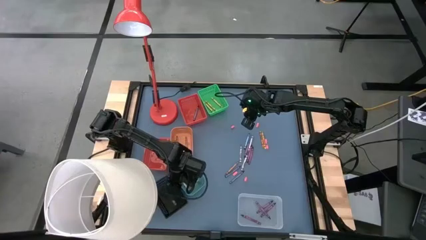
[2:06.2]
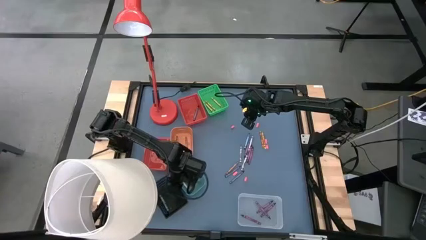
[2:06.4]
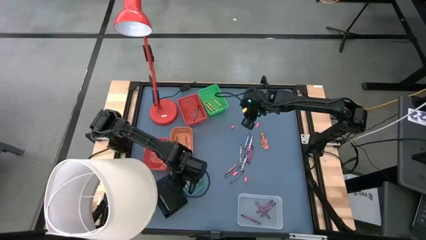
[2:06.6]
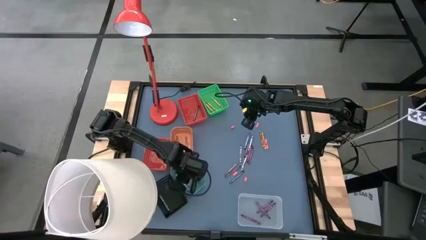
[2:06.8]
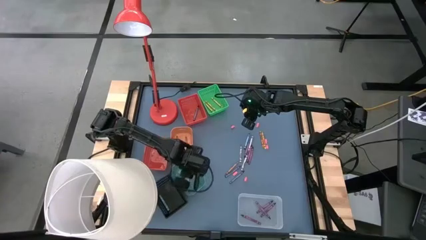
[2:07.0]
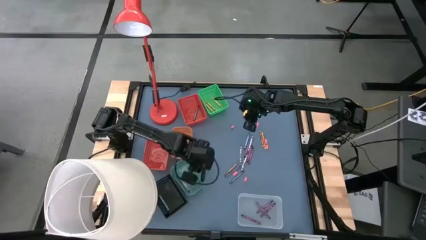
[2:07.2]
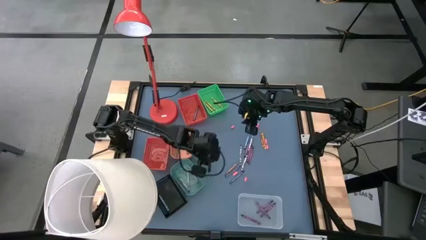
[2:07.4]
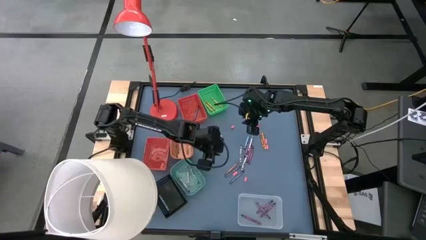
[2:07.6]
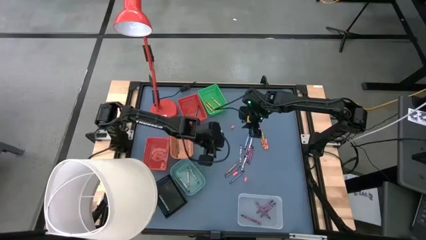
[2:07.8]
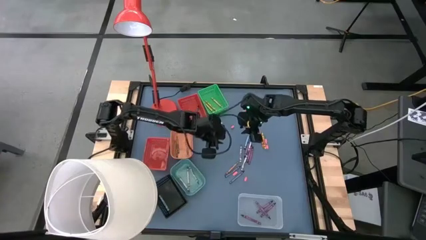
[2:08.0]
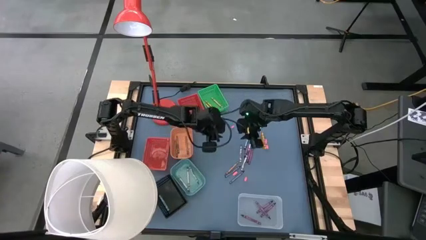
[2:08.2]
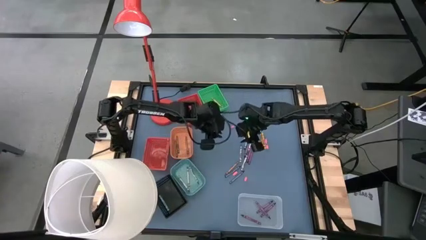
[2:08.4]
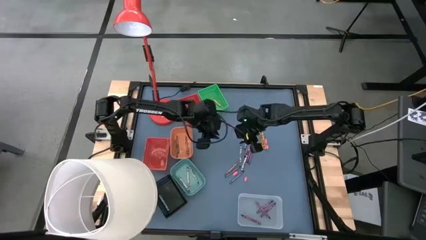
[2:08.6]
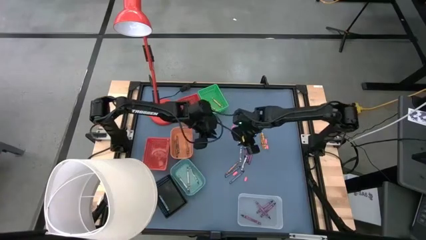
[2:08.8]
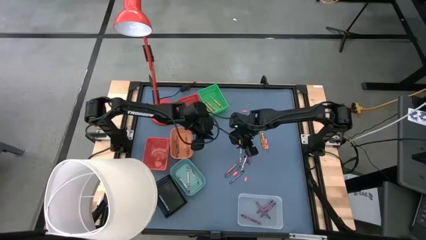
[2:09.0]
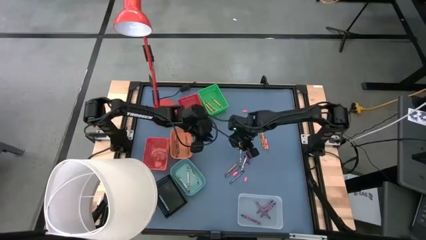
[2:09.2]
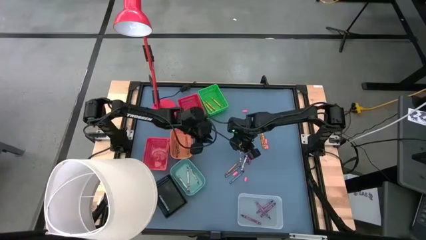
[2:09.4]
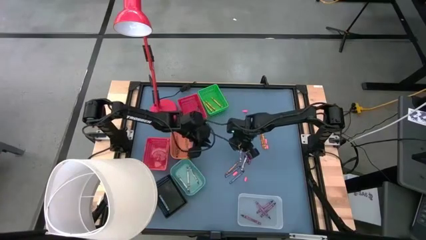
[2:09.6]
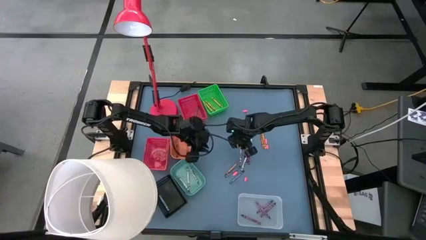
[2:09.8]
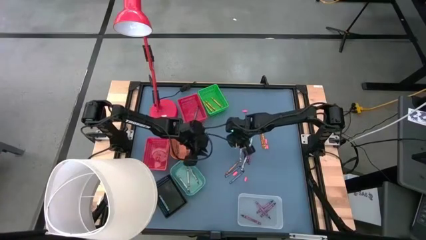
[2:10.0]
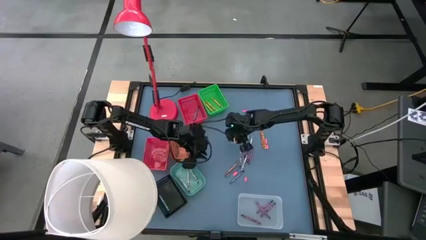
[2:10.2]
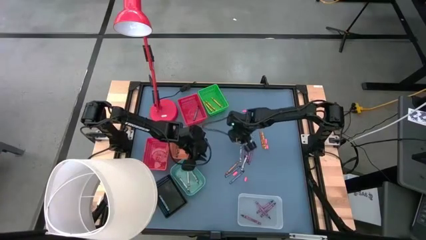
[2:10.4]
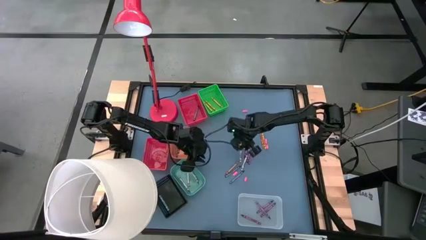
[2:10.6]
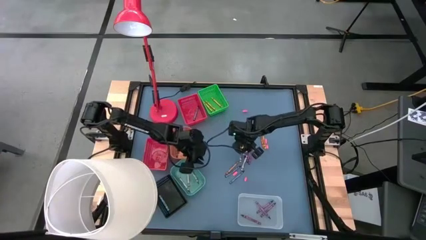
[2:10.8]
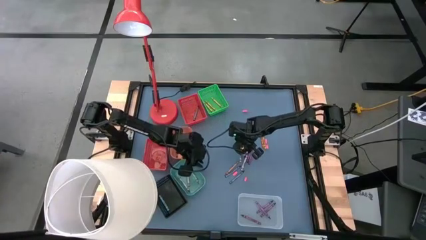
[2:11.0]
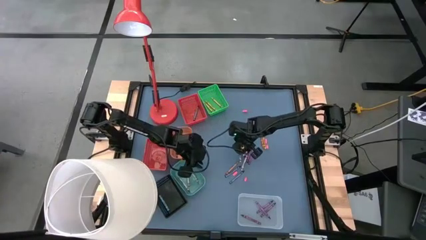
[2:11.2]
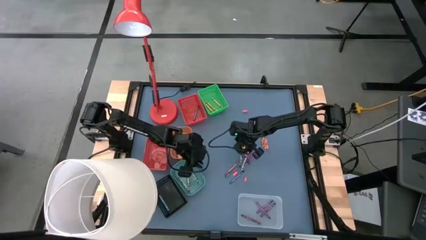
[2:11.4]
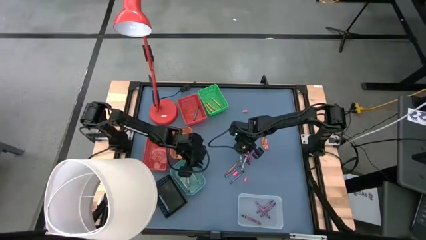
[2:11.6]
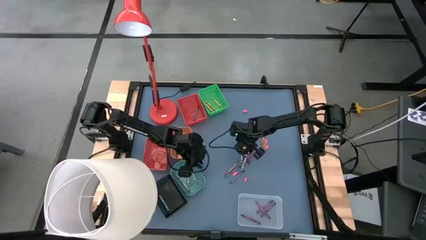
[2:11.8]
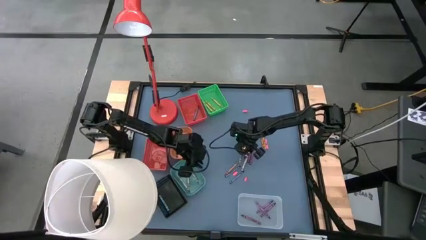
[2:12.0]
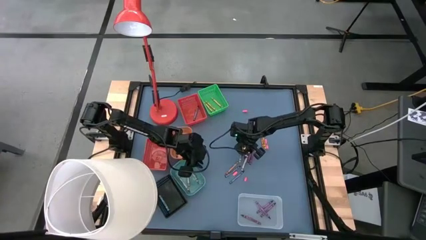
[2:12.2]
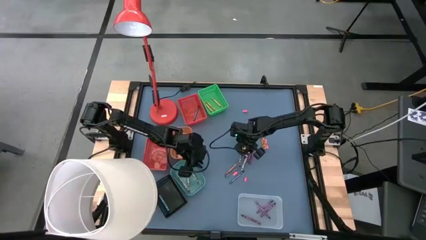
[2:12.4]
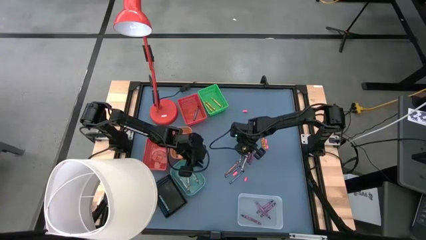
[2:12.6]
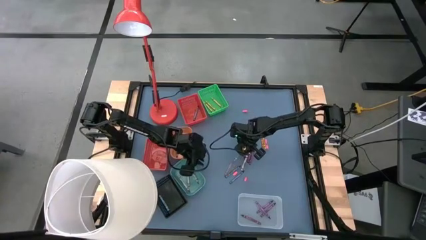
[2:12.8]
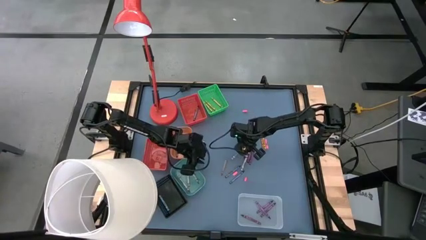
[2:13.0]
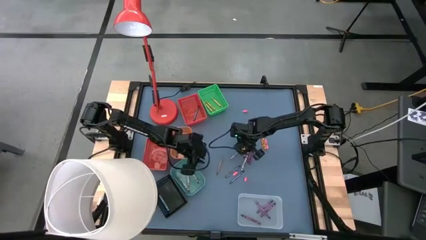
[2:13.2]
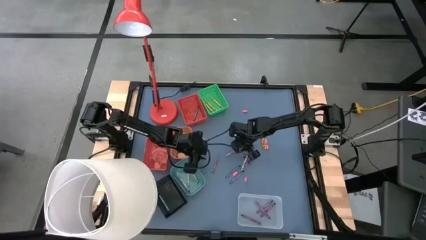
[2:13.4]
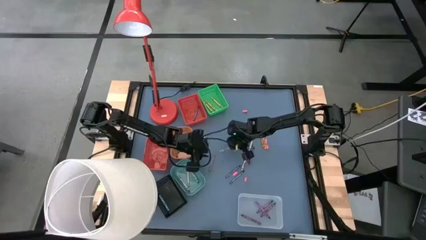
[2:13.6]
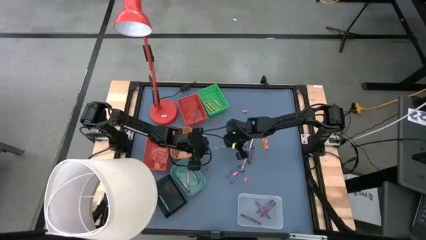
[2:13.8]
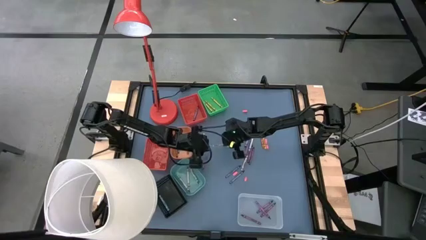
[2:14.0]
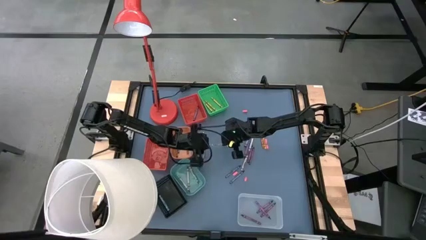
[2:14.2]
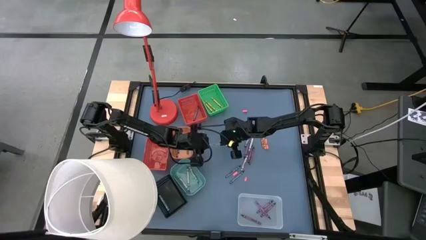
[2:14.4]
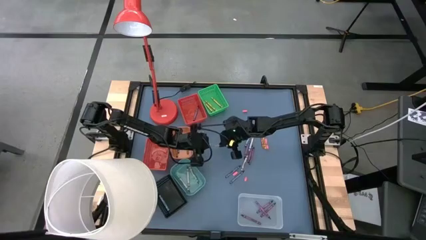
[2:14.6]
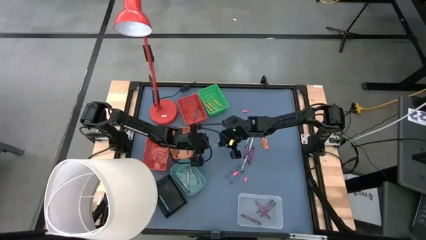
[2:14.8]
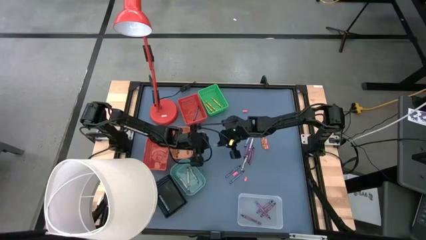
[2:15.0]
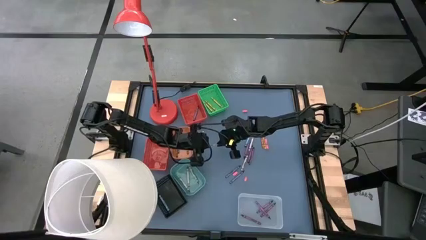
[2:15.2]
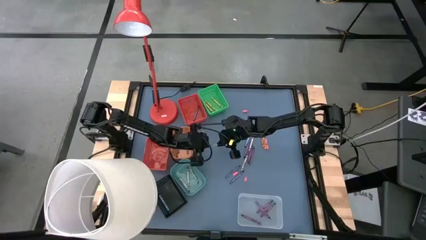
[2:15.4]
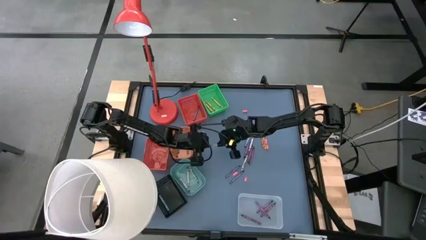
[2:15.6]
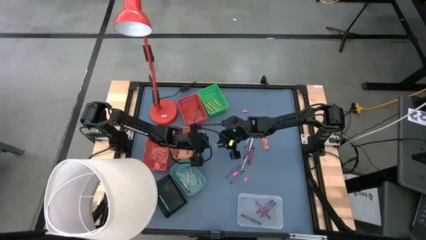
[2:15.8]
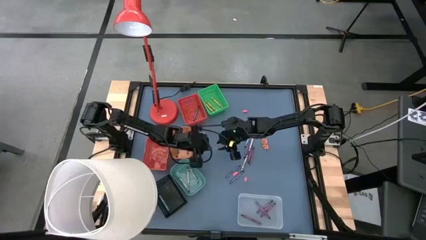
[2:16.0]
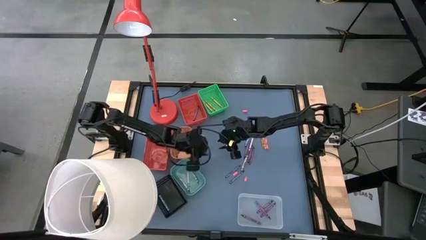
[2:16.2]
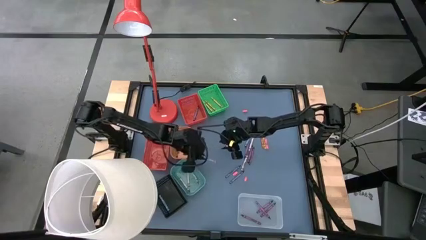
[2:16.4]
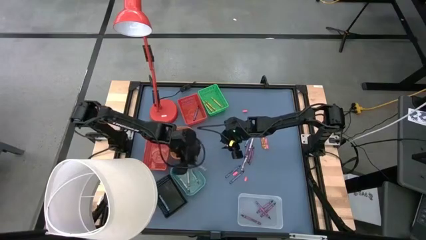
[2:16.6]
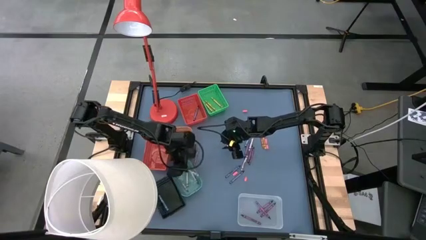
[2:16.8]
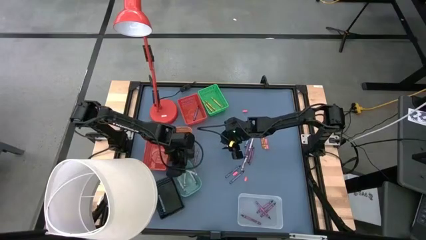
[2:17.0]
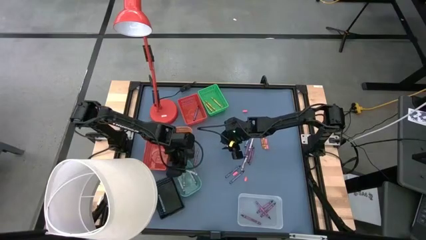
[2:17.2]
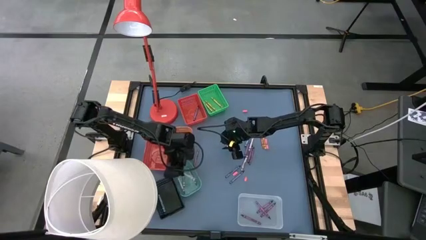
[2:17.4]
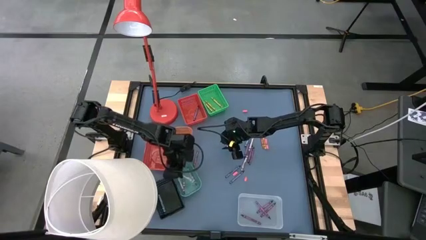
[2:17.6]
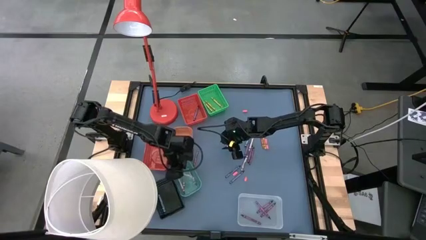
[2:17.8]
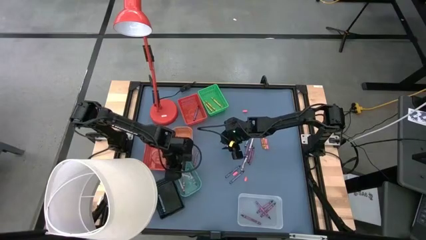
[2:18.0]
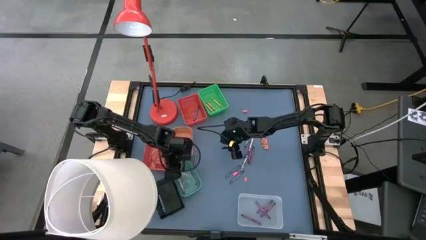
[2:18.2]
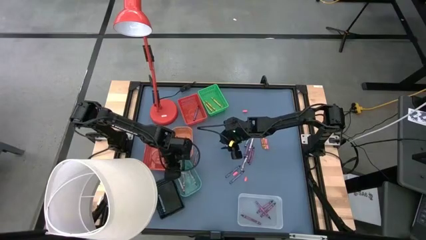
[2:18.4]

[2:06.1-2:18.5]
Task: Sort crayons
Put the gray crayon into the light green bin

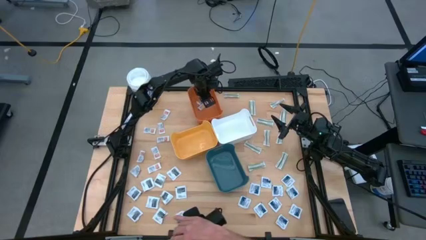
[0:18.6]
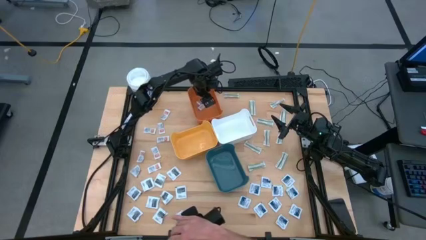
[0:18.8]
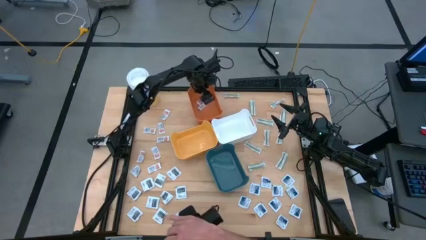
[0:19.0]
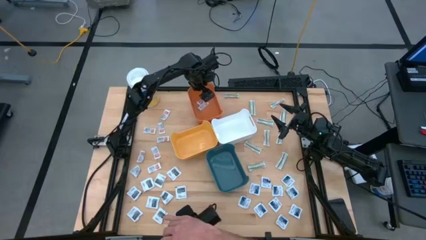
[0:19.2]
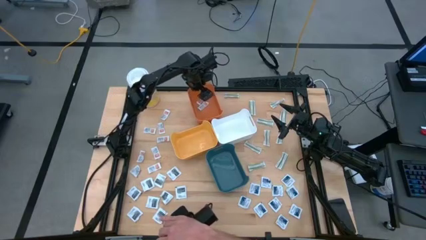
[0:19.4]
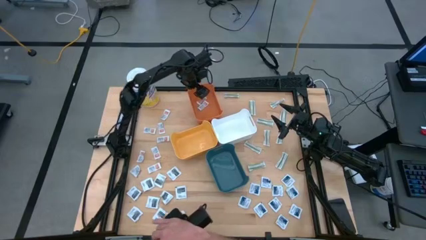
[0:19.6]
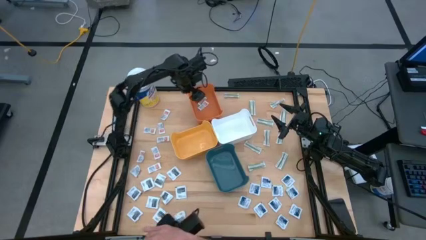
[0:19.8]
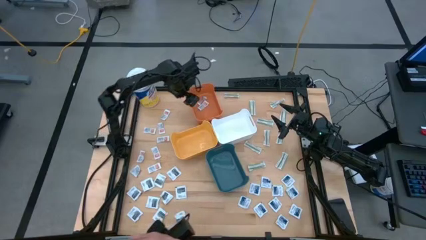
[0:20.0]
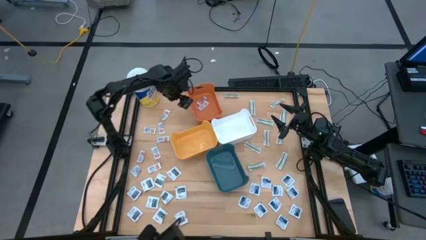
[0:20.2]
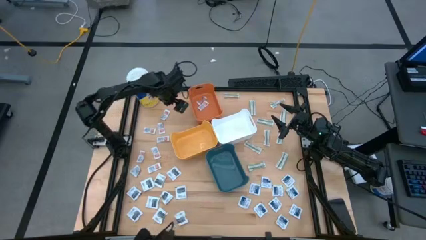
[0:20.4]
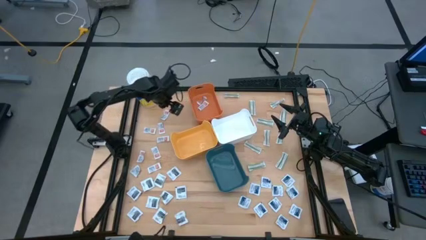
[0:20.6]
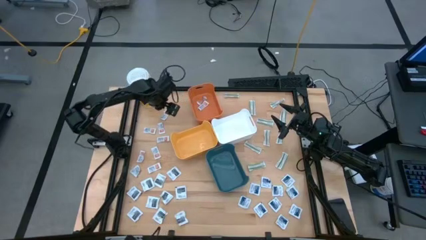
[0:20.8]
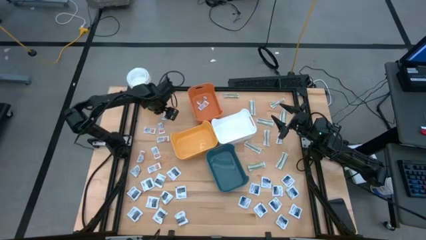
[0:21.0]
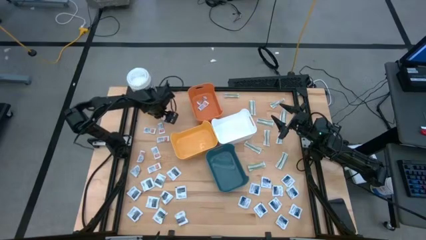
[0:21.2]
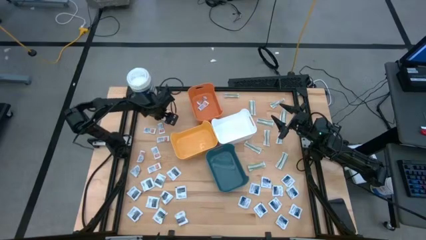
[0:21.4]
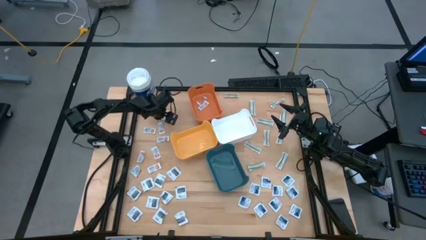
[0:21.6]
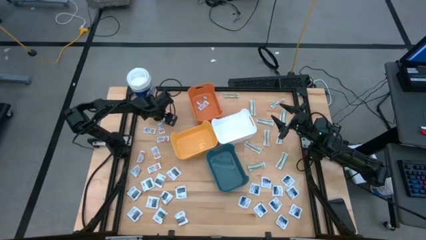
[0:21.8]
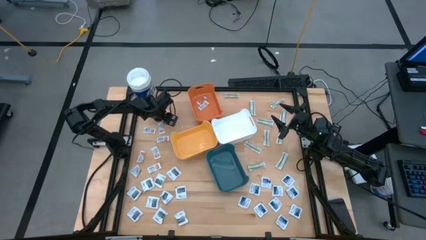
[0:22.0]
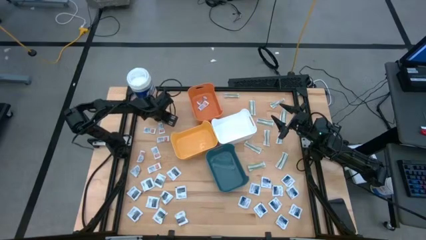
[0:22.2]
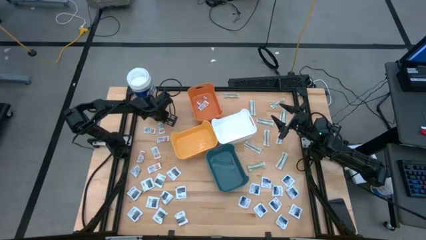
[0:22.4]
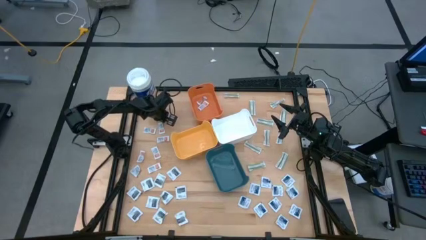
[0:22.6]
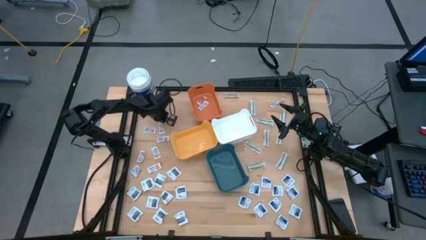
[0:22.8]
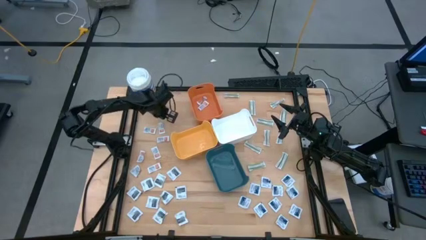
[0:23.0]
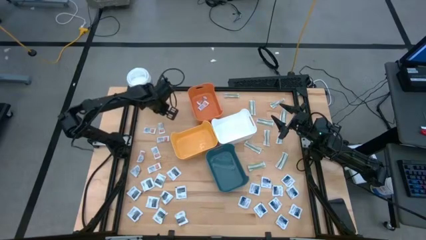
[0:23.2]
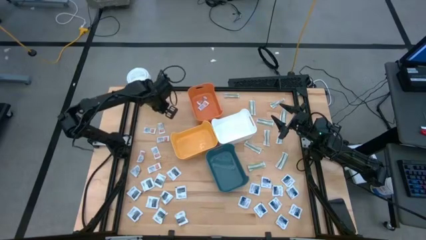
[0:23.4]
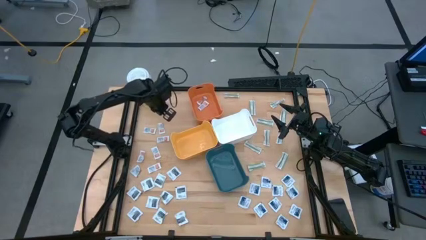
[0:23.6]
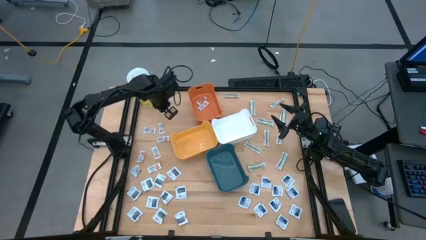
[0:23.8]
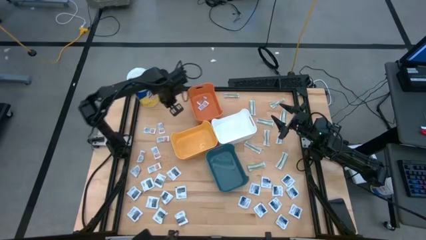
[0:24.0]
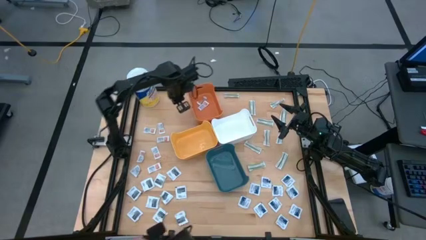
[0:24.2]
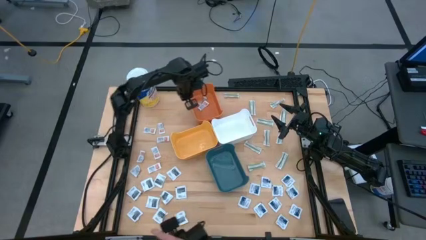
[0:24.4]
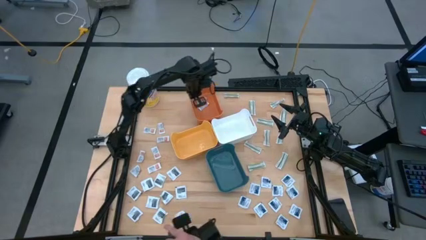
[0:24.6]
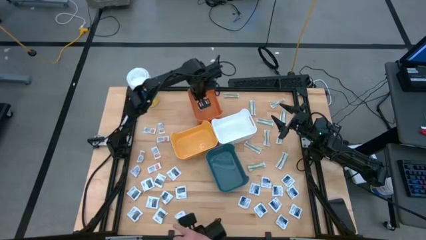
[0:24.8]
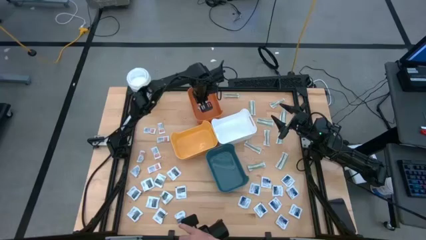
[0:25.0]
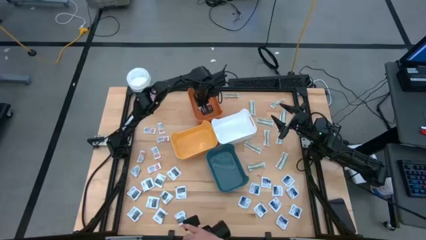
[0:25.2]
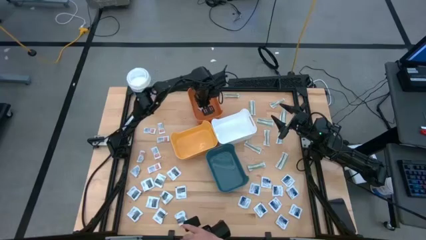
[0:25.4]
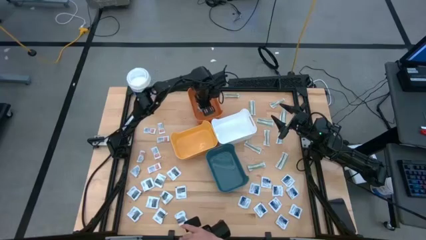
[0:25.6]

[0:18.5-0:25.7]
Task: Pick & Place First Aid Supplies
Put the orange ointment pack into the orange bin
